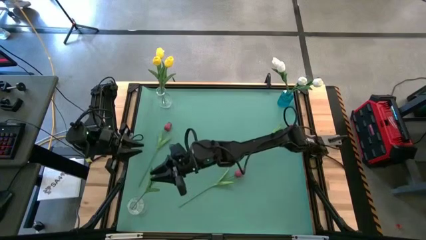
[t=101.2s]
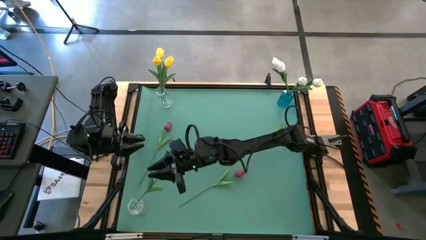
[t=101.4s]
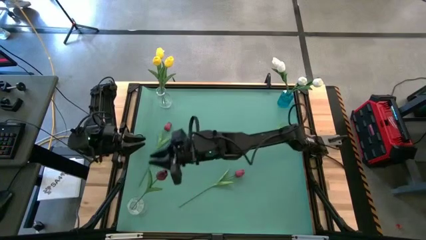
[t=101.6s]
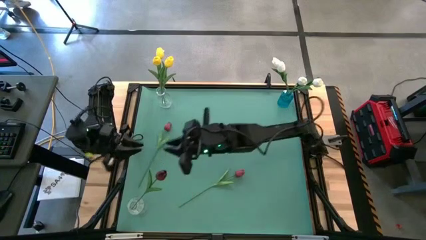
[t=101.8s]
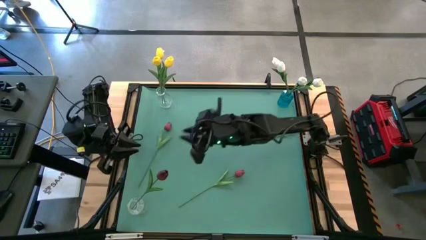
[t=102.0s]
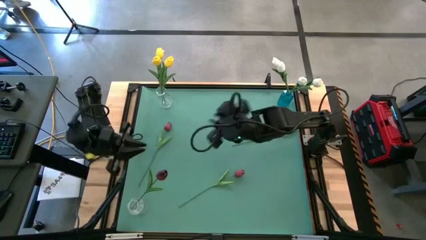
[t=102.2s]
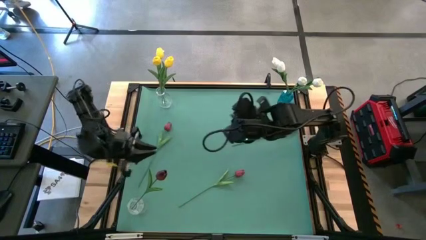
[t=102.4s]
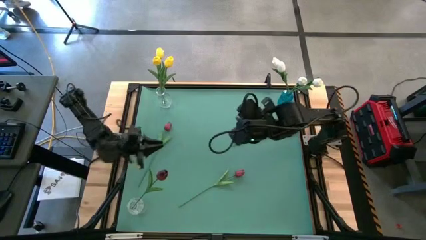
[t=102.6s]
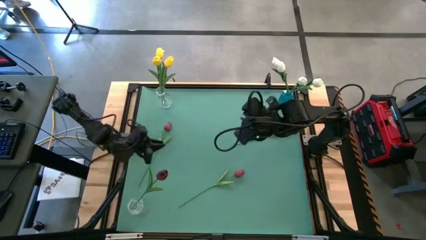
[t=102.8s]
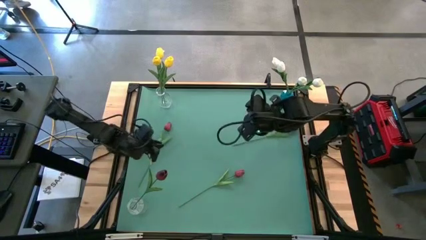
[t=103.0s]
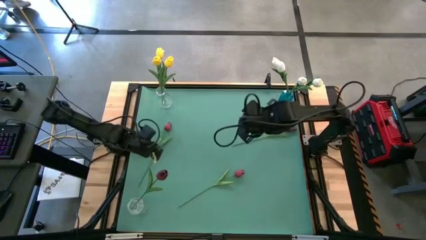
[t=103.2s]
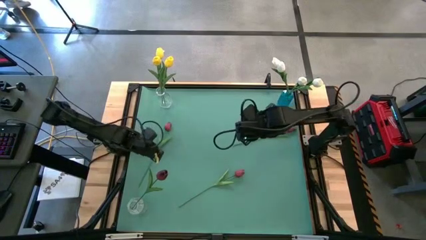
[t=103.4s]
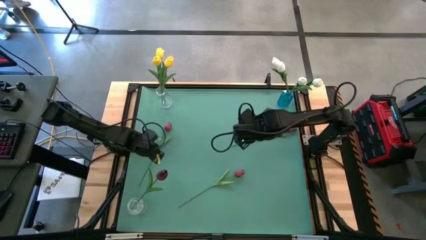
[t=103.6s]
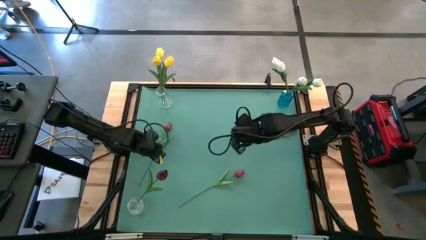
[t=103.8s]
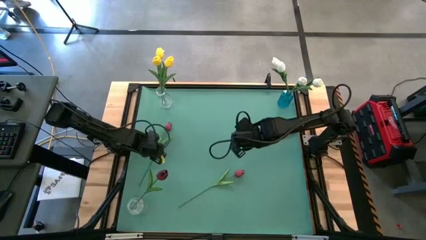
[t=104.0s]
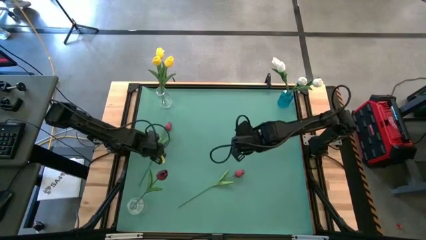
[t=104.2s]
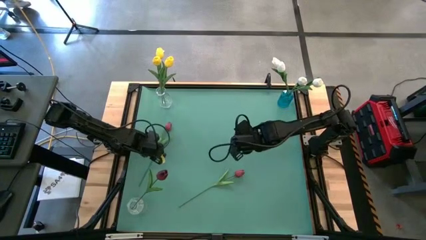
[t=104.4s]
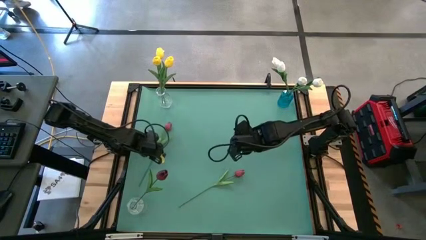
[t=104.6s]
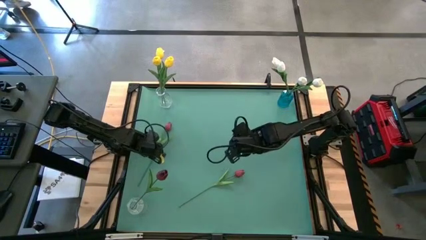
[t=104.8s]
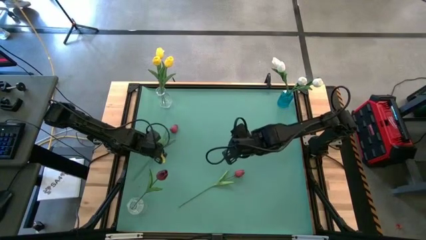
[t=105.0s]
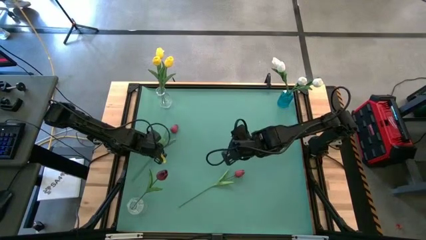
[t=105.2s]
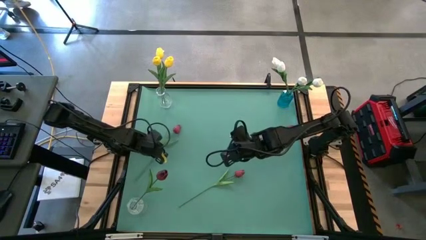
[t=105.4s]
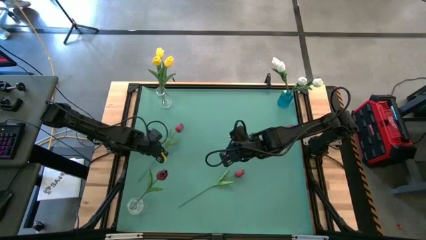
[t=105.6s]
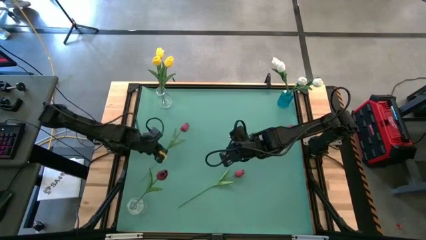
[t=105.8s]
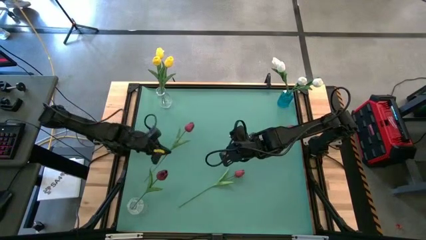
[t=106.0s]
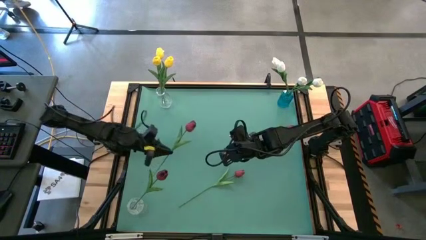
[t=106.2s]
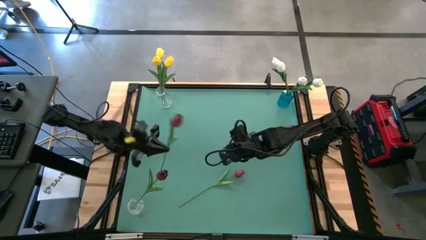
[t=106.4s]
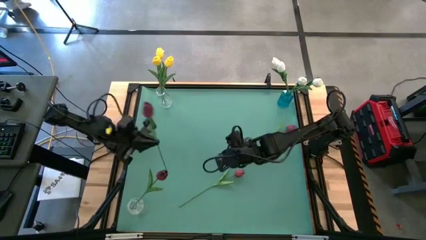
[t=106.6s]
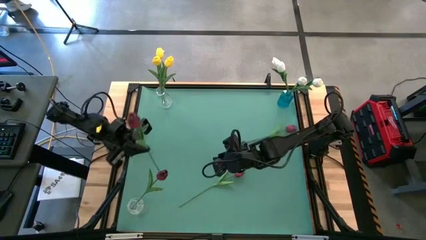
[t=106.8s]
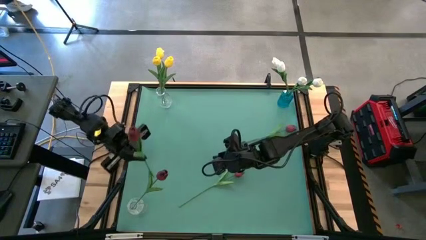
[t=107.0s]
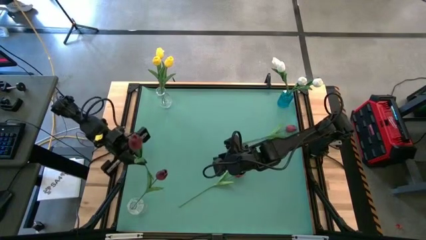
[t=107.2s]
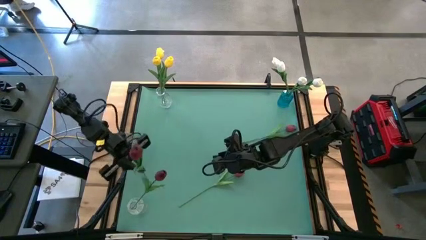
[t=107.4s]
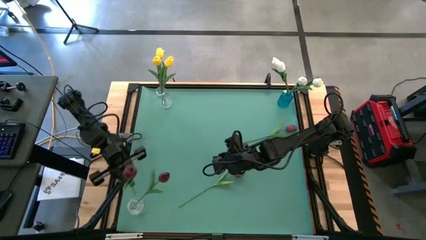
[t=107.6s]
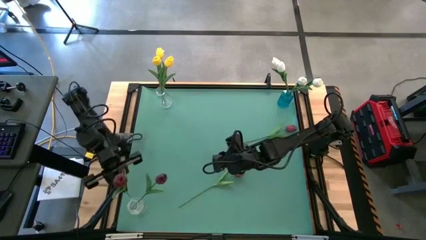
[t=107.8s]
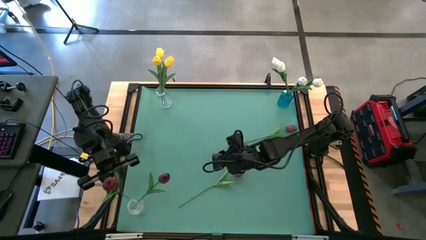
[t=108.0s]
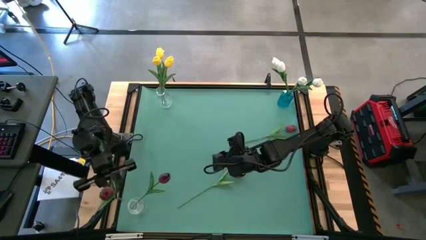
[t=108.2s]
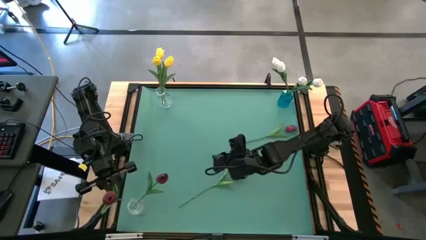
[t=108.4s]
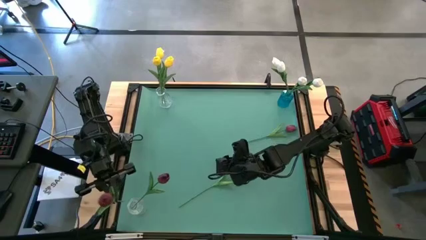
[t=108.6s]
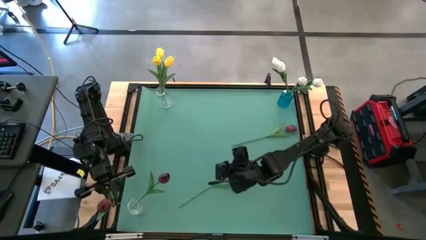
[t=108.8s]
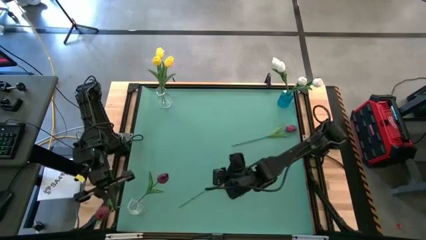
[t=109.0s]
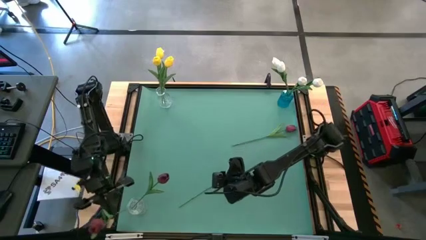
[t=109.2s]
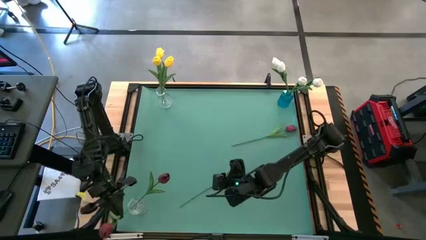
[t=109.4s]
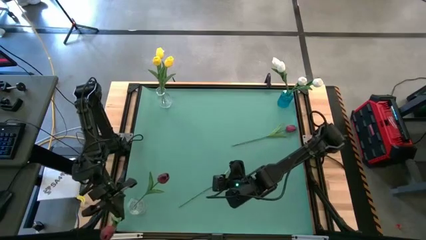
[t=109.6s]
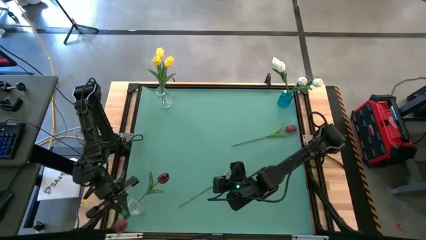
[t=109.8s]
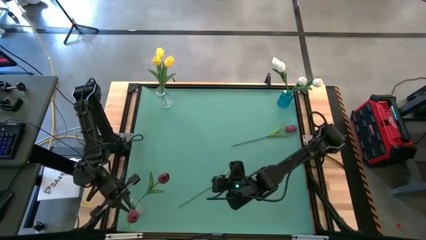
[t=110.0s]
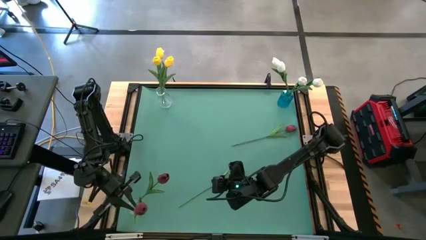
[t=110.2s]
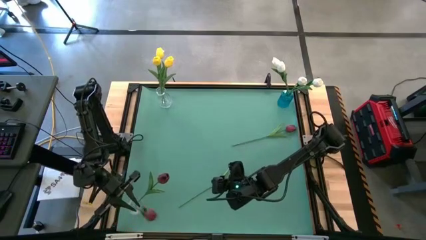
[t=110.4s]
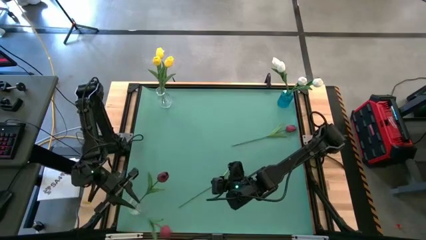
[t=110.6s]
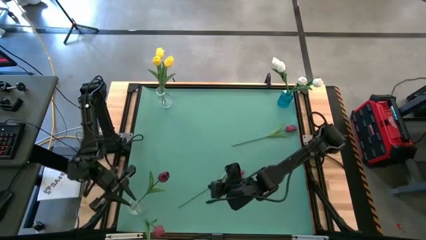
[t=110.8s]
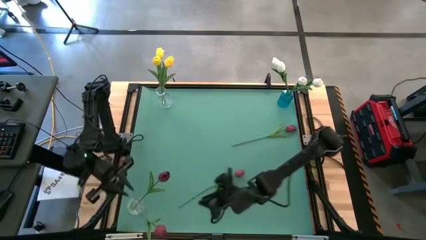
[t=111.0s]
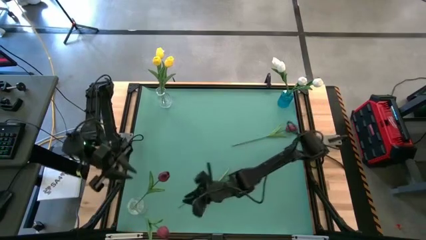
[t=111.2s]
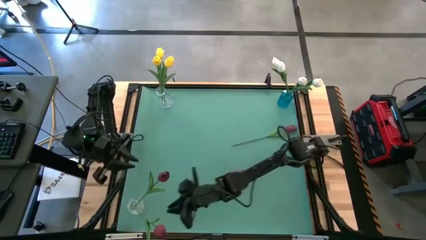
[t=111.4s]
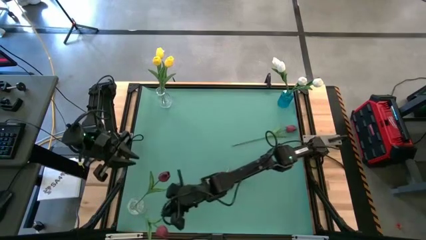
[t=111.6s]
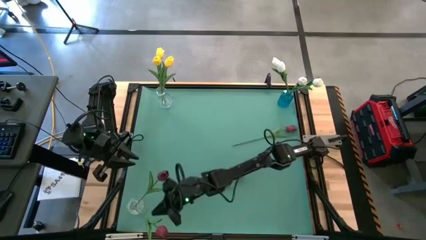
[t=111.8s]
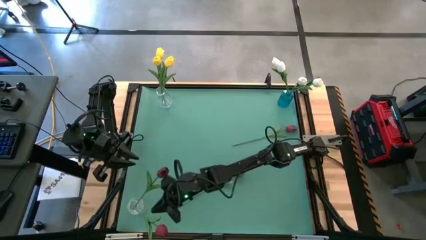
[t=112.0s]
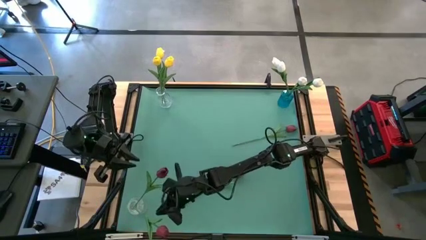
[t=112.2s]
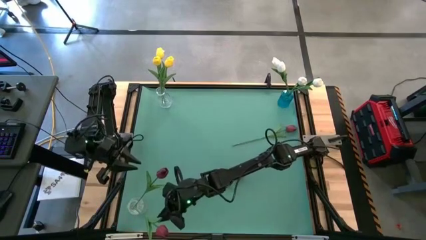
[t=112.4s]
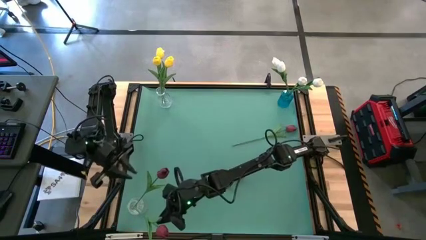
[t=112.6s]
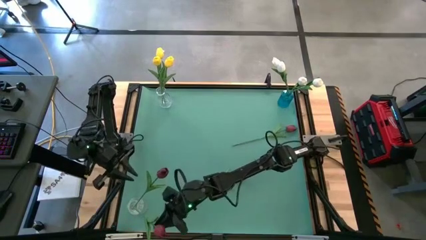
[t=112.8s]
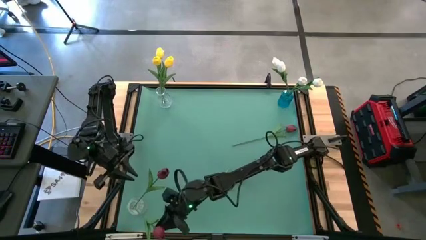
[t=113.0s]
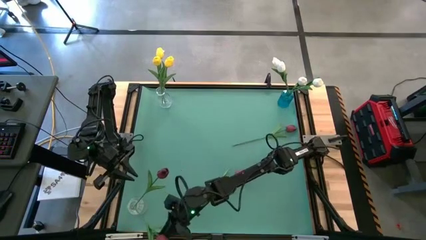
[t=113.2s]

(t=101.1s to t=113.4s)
Task: Sort flowers into vase by color
Put the top left red flower into the bottom transparent vase

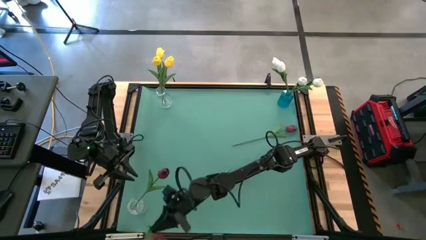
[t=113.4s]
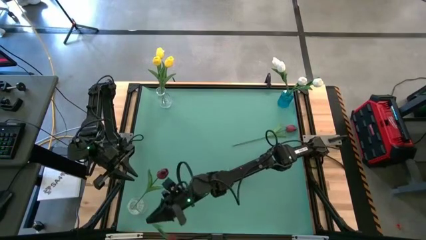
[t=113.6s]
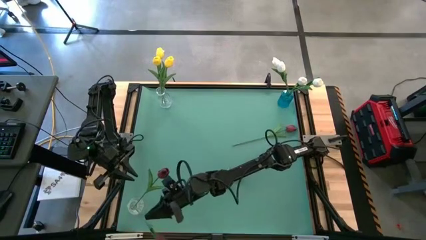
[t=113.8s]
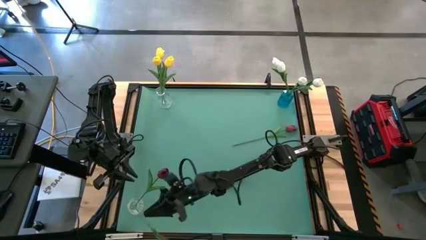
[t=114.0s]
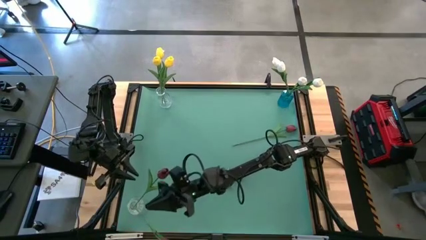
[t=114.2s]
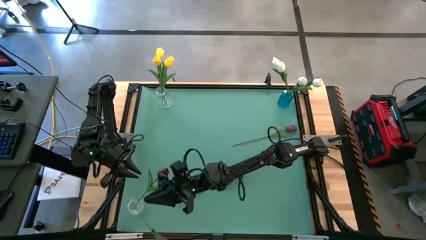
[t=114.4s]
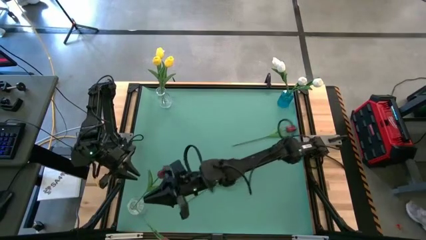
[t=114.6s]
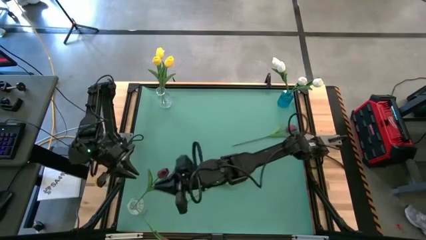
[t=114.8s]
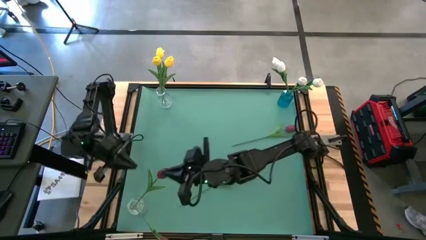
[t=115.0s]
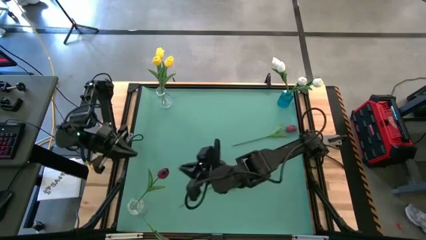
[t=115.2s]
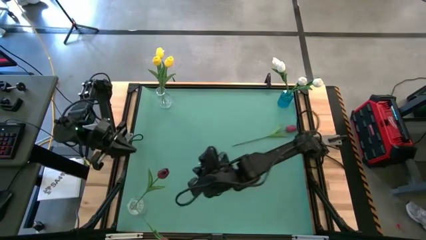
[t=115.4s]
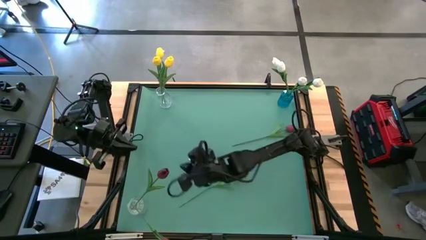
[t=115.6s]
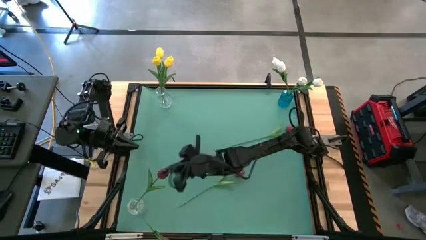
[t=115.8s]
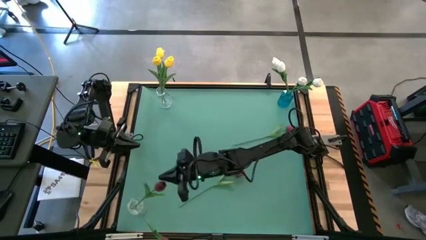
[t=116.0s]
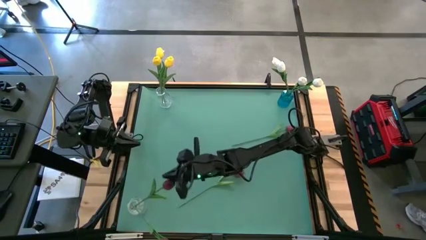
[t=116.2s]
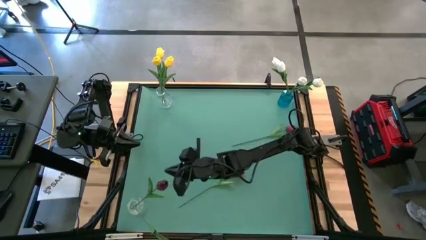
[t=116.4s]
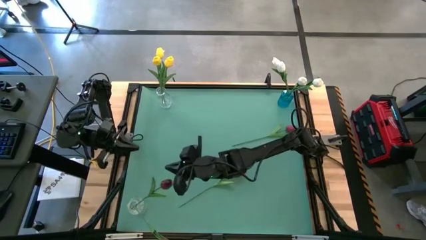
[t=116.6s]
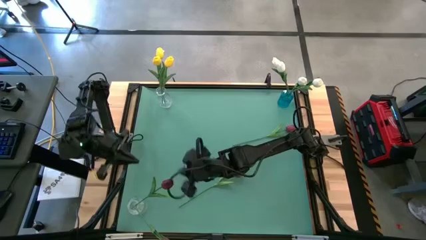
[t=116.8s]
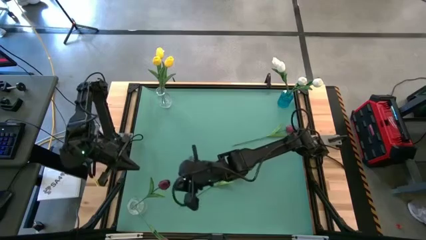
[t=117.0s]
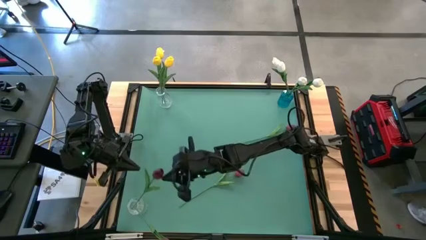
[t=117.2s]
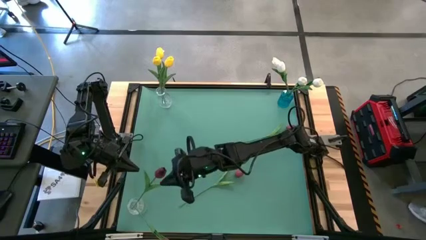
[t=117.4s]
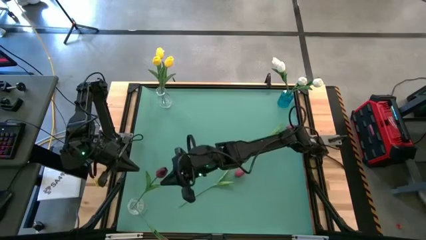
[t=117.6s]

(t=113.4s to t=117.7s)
Adjust the red flower in the bottom transparent vase
